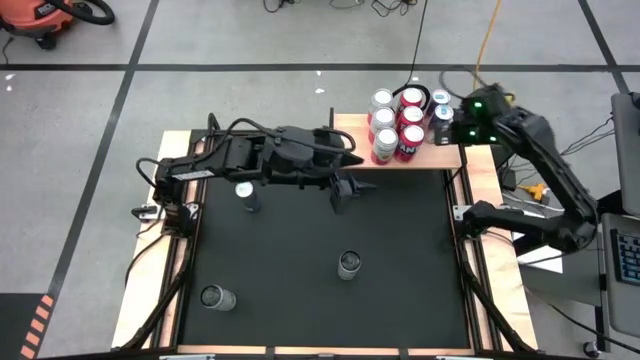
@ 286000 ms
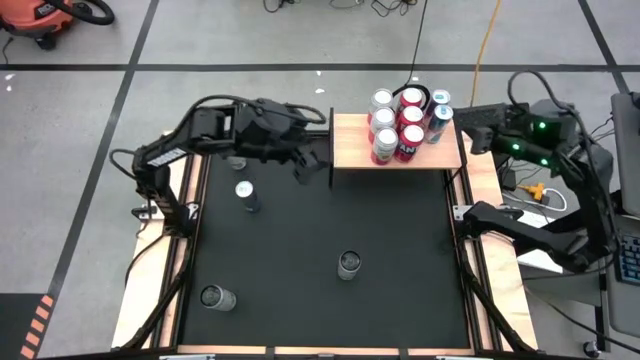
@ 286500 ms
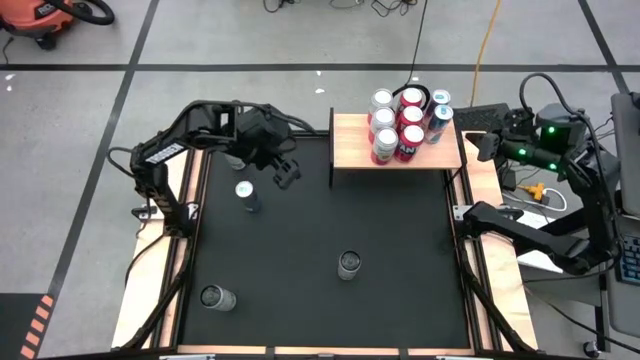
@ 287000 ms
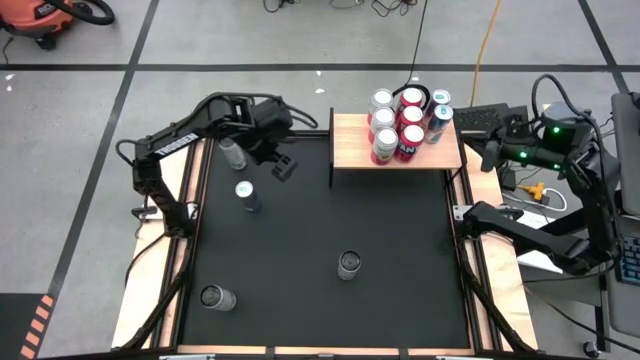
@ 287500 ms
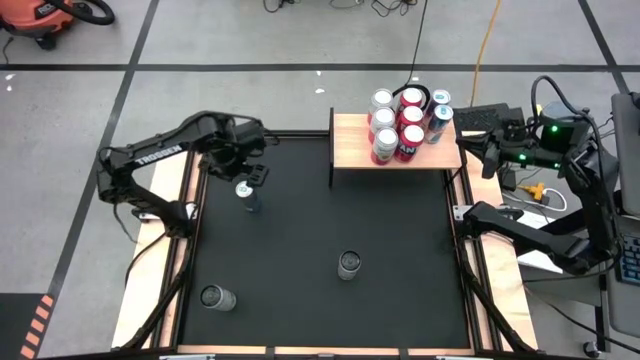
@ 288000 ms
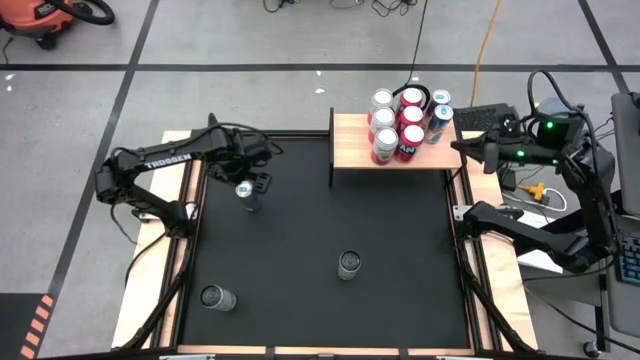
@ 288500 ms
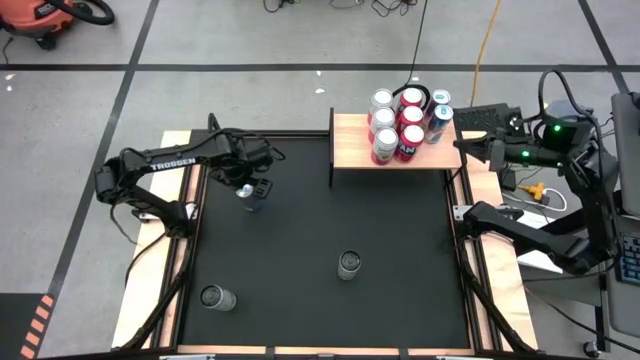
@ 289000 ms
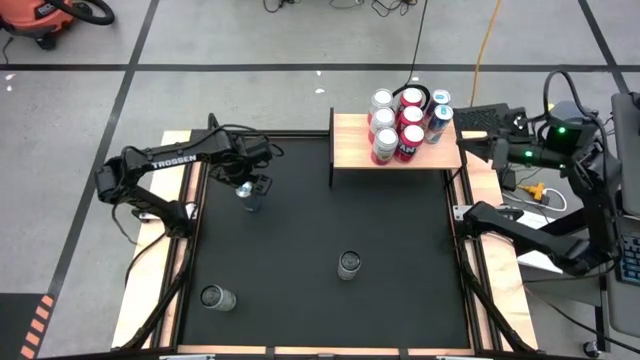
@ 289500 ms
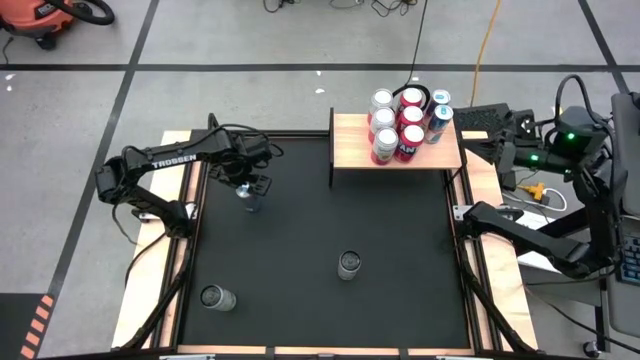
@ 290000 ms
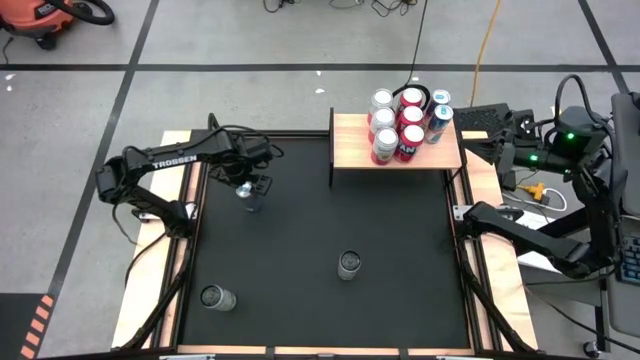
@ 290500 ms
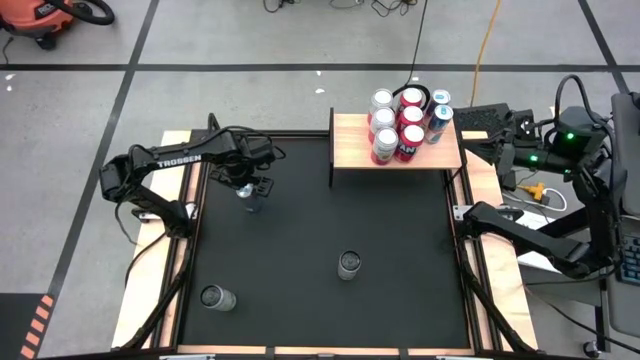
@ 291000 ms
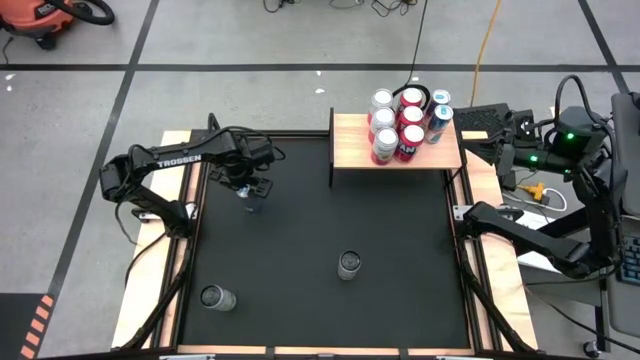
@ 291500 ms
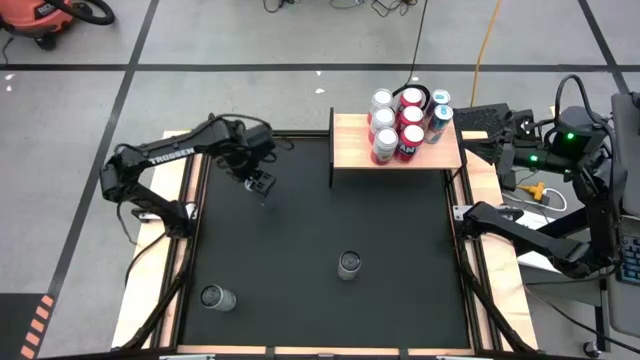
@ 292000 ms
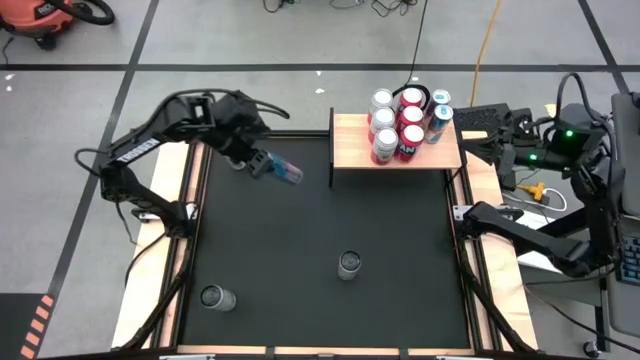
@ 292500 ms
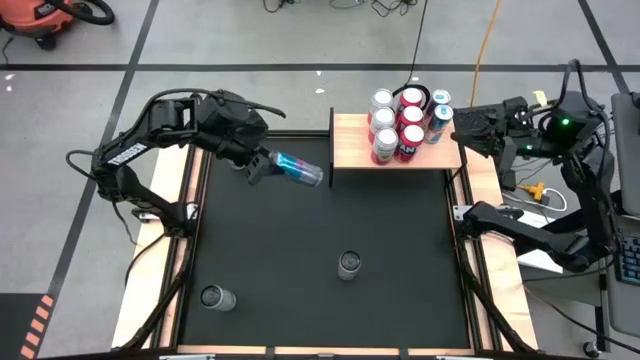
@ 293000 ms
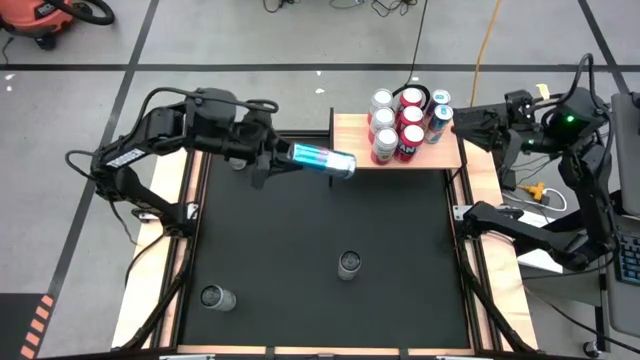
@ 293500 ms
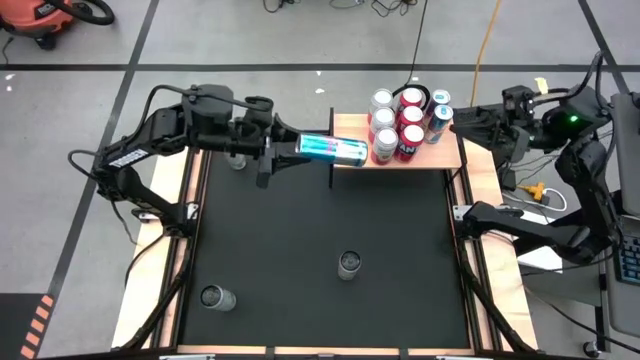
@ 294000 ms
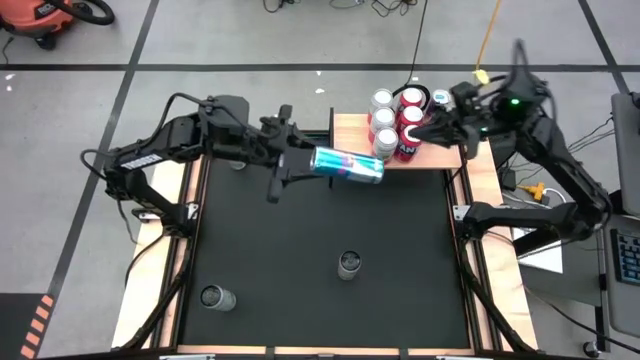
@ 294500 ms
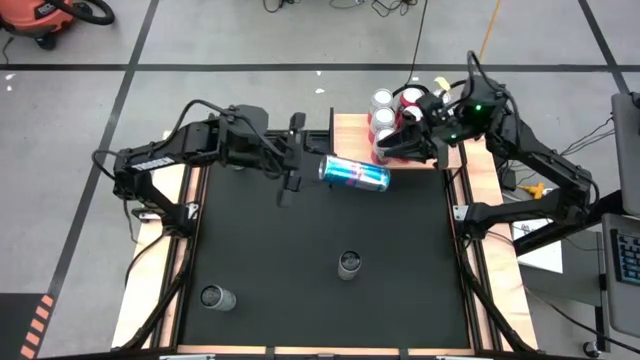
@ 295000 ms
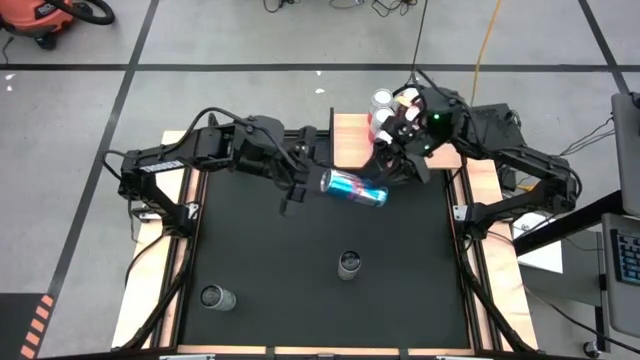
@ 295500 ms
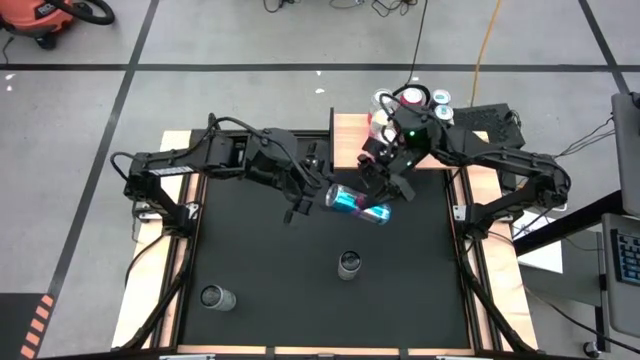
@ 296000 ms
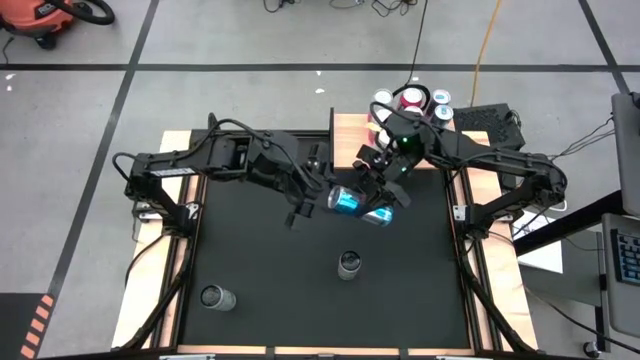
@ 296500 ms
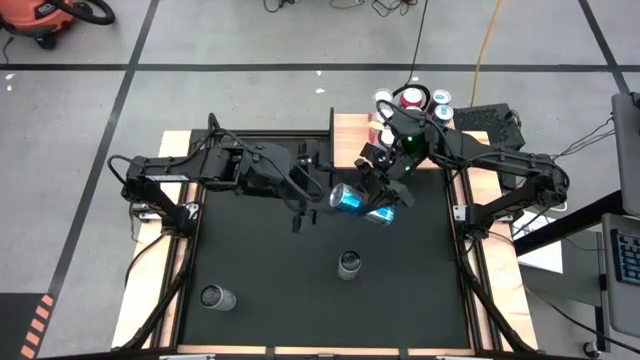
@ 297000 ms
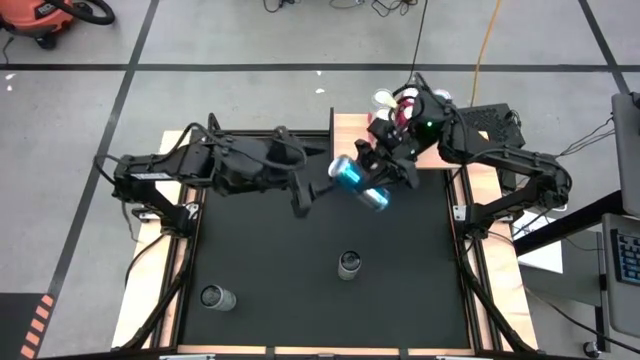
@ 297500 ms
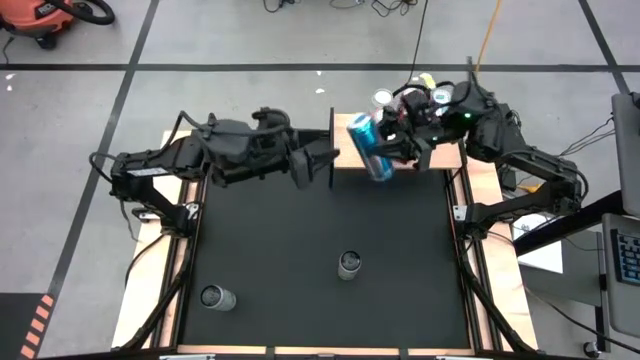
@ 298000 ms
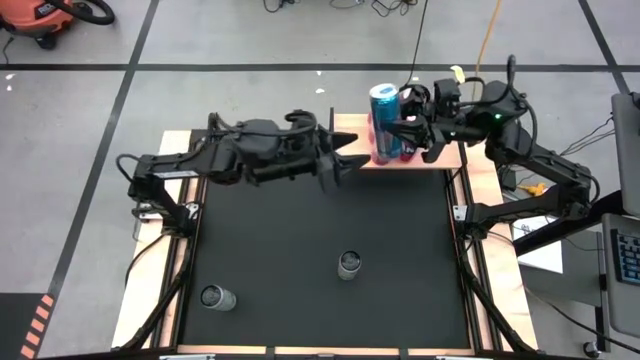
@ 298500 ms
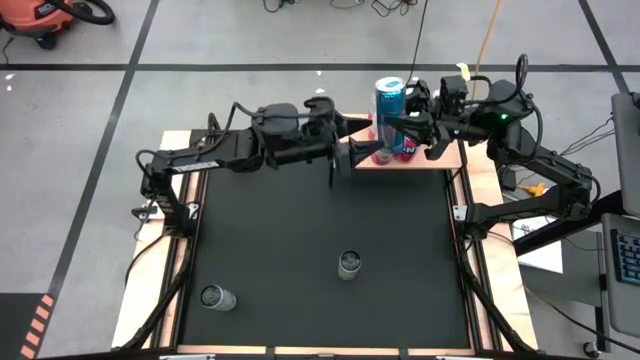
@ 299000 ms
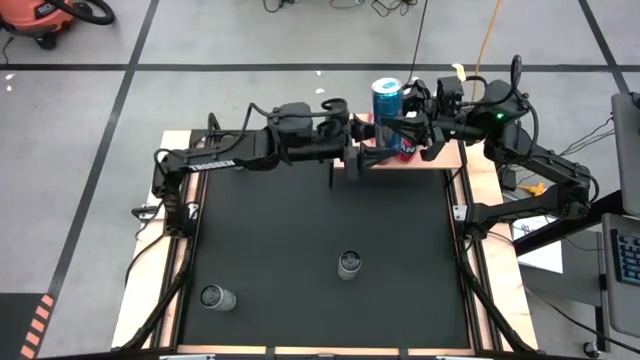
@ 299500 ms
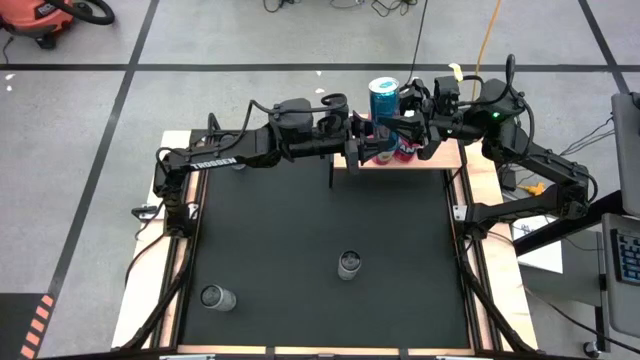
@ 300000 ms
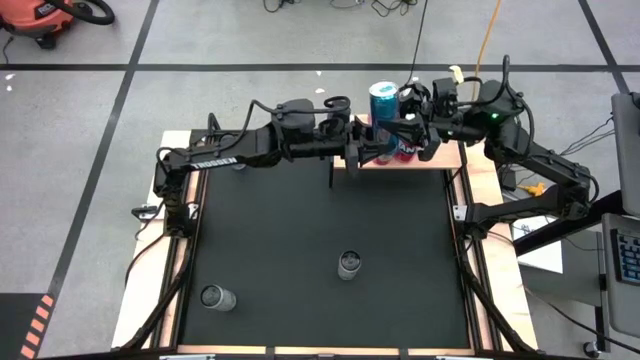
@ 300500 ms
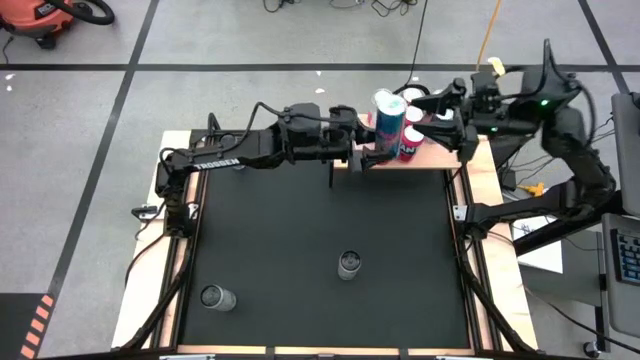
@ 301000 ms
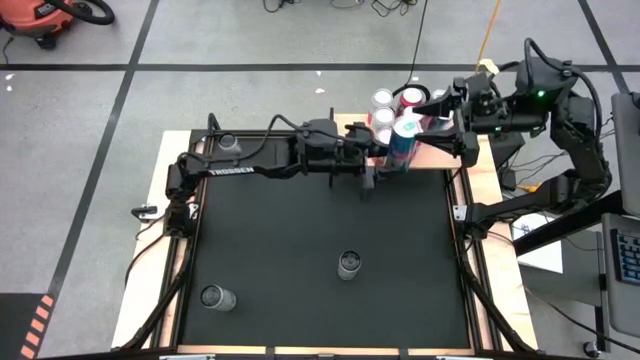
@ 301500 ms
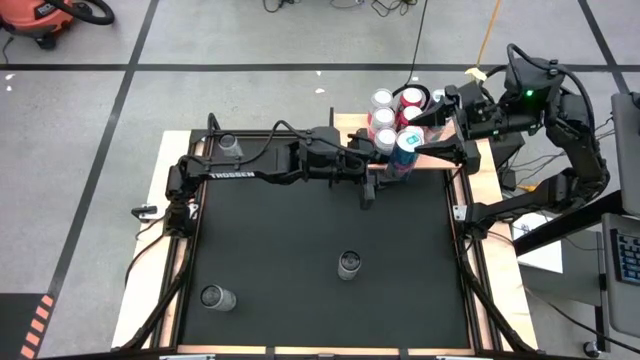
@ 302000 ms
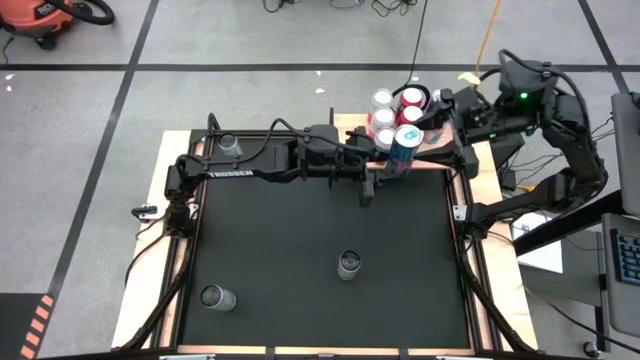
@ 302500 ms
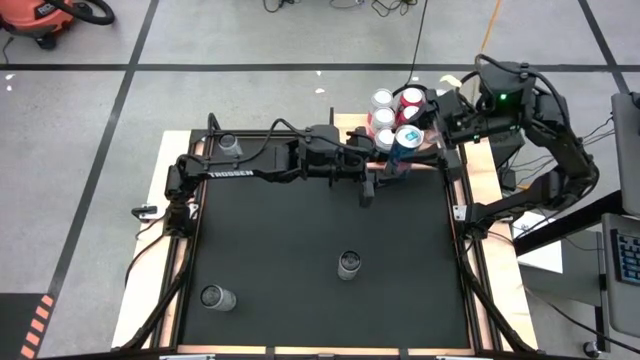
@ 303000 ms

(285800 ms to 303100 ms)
Task: Place canned beverage on shelf
Put the blue soda can on the shelf aligned with the other blue soda cans

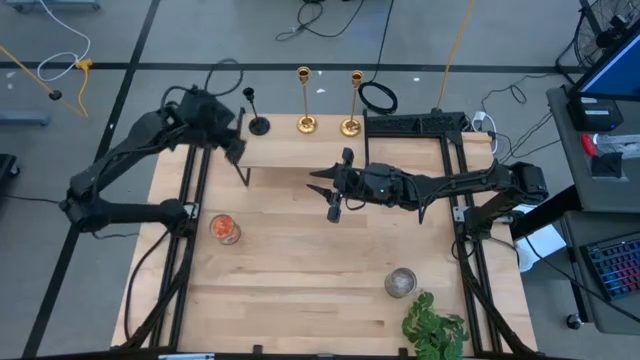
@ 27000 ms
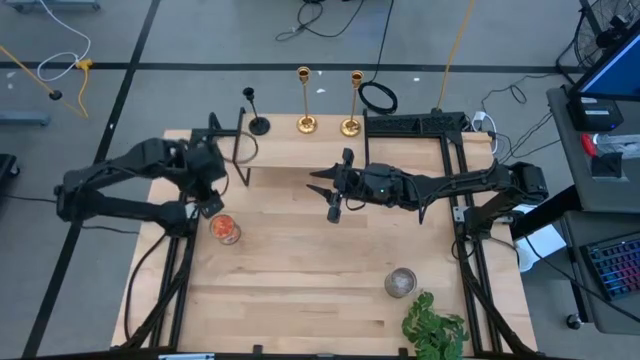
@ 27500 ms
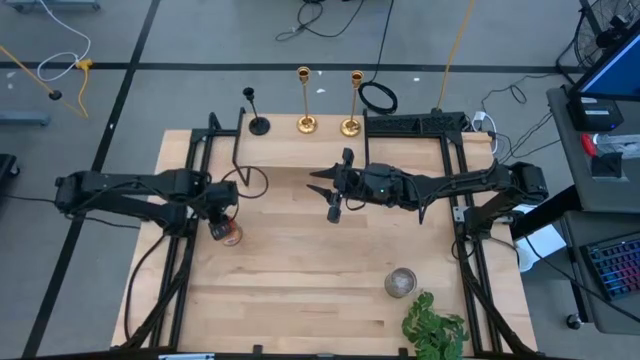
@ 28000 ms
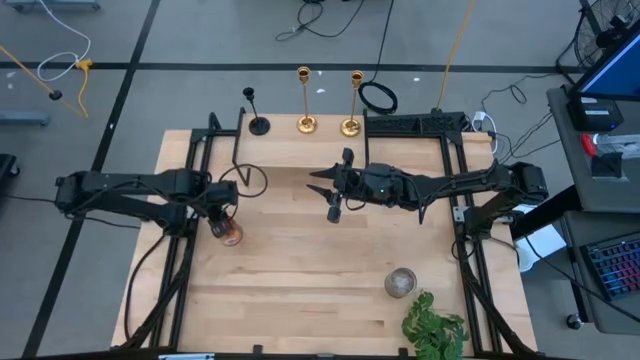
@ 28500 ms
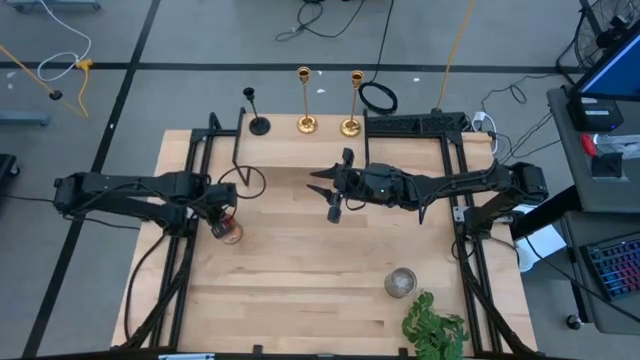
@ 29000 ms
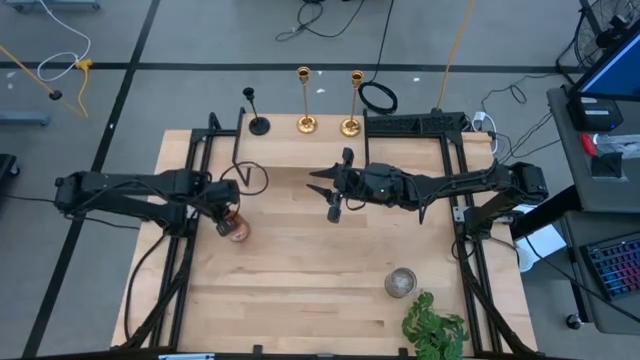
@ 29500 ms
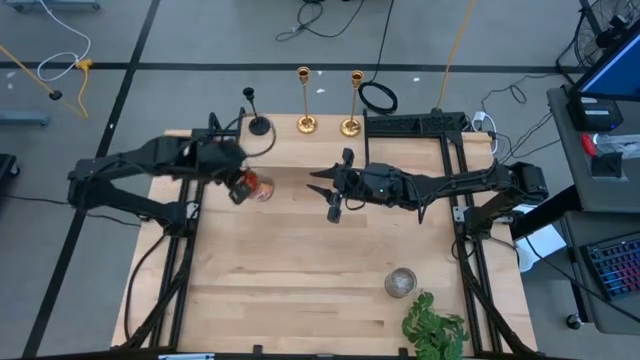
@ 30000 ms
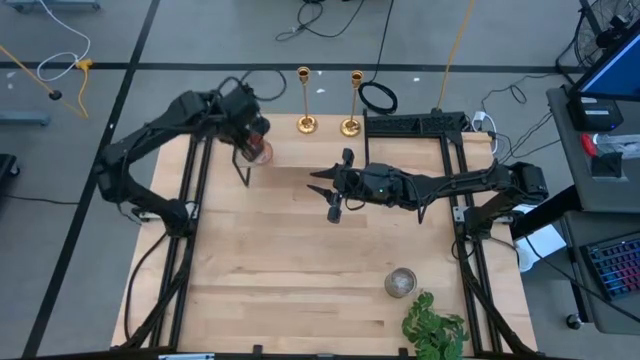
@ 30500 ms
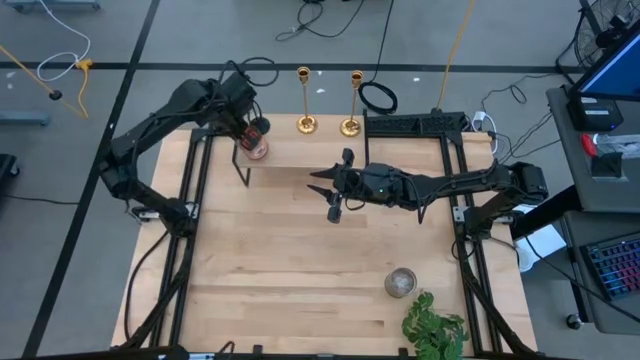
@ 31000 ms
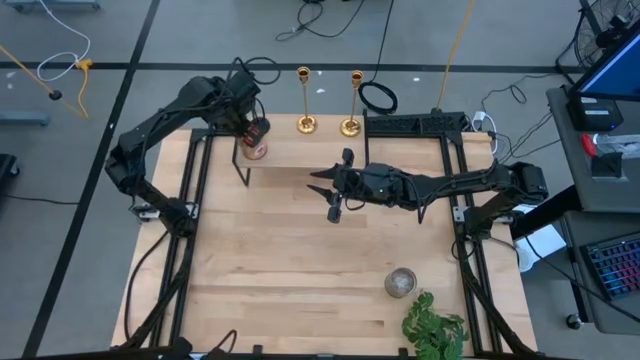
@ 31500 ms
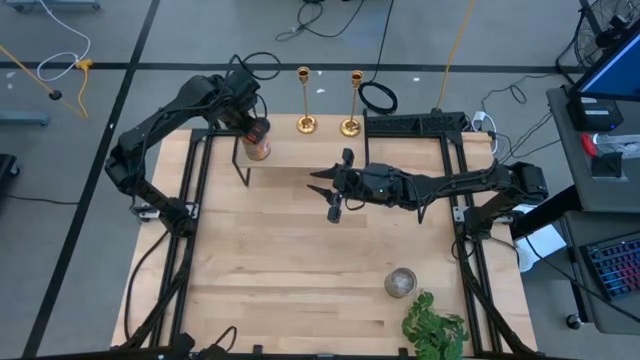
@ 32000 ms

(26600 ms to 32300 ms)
Task: Pick & Place candle stick holders
Put the left silver scented candle on the shelf
